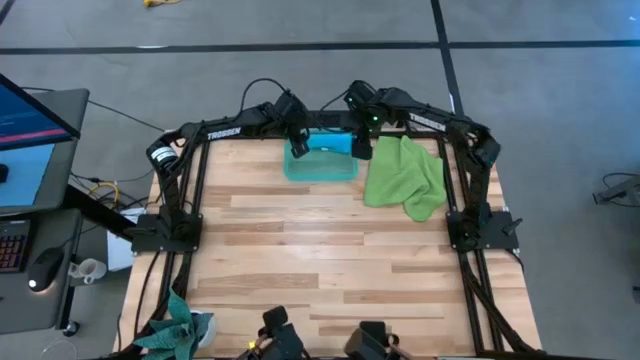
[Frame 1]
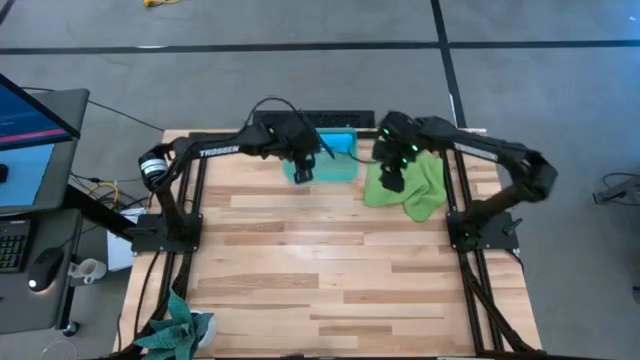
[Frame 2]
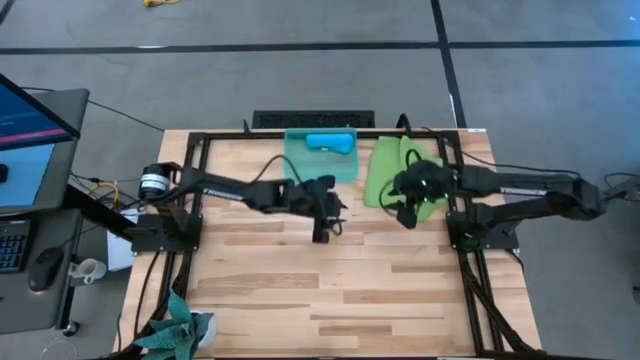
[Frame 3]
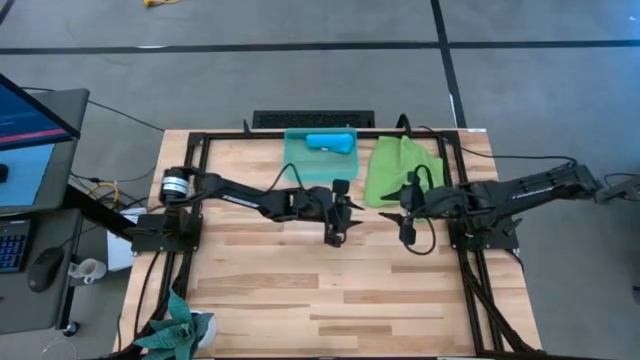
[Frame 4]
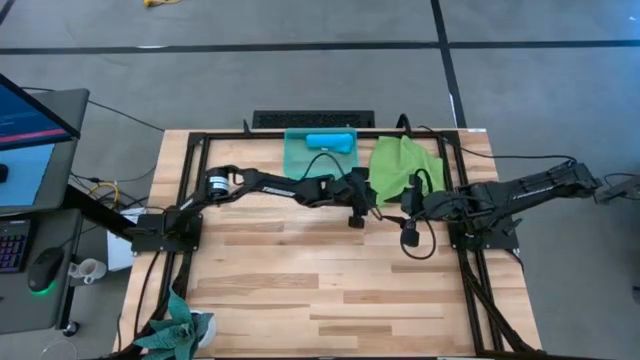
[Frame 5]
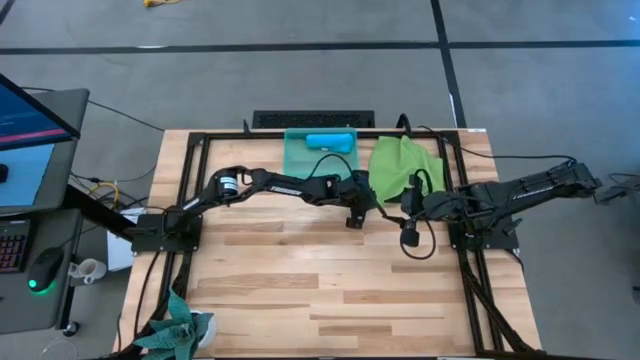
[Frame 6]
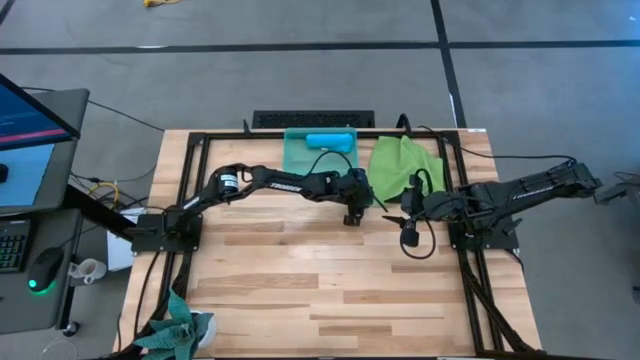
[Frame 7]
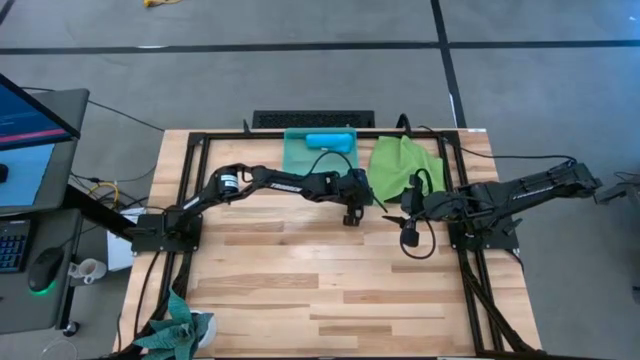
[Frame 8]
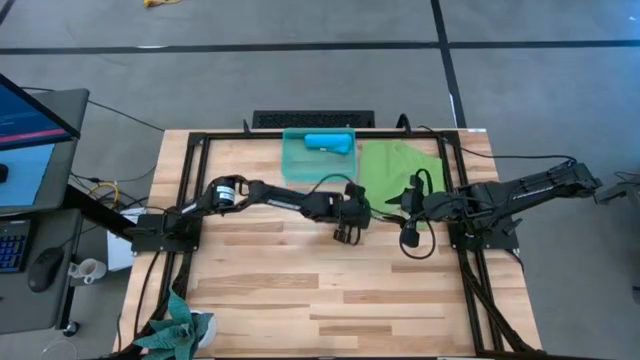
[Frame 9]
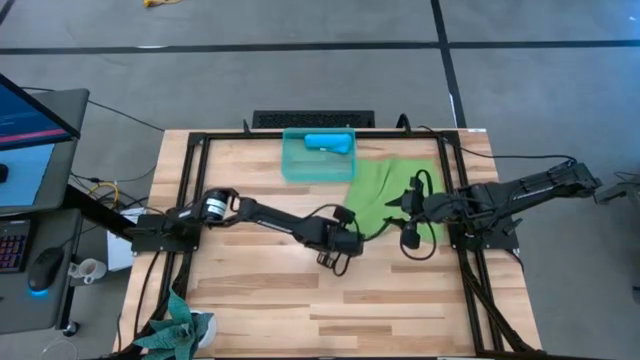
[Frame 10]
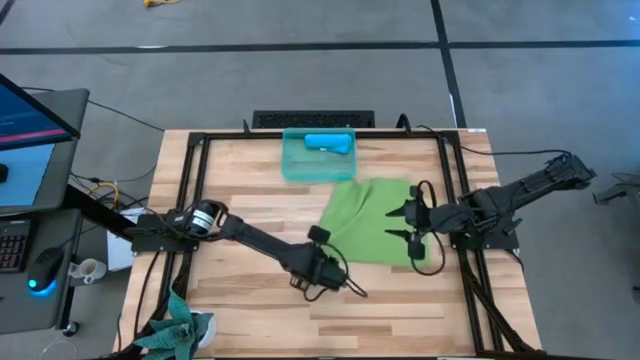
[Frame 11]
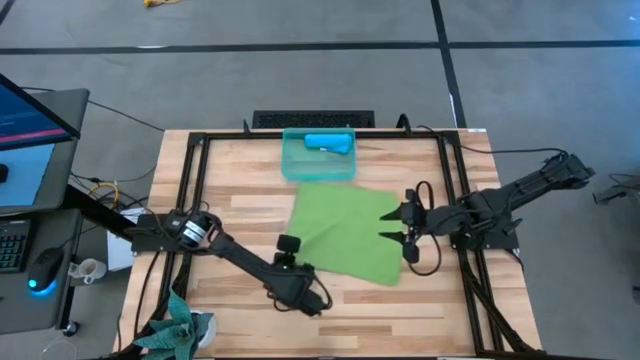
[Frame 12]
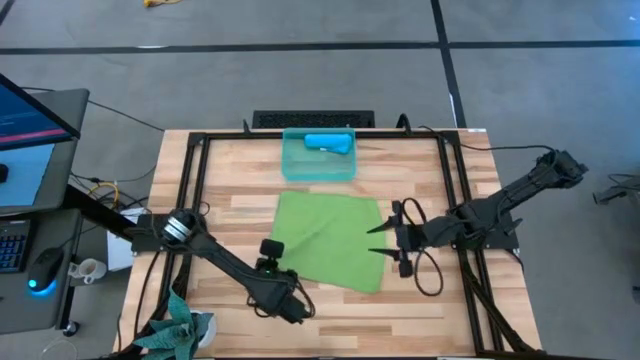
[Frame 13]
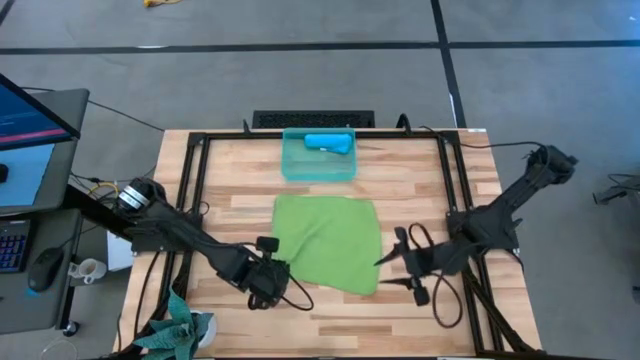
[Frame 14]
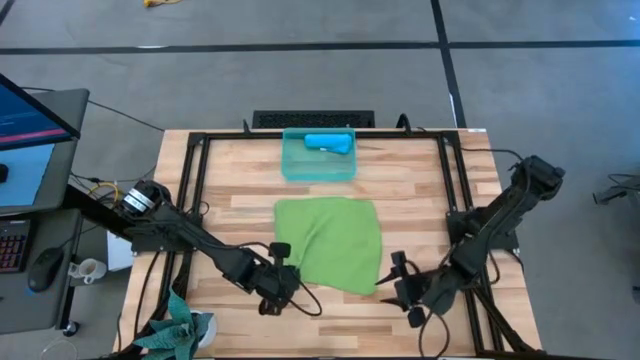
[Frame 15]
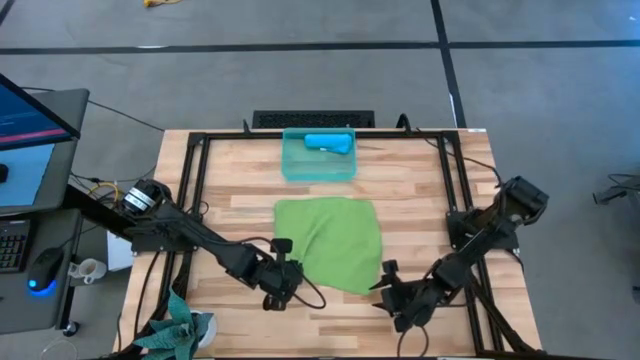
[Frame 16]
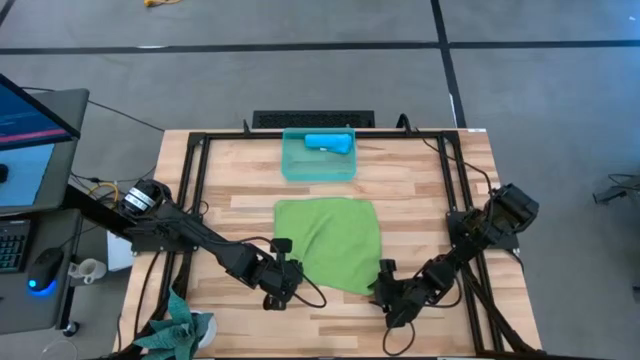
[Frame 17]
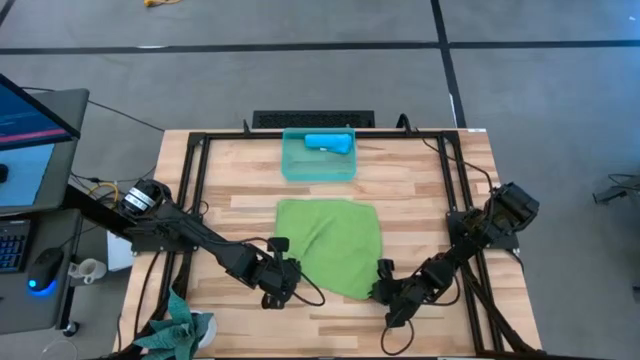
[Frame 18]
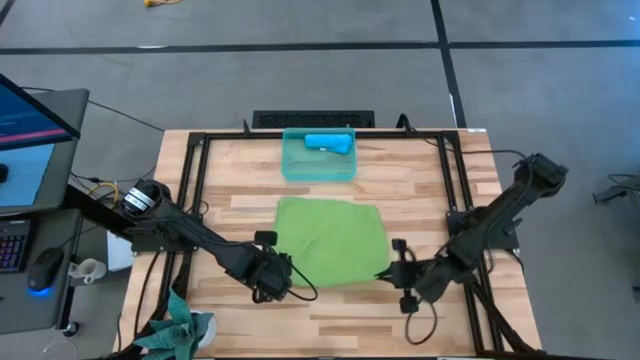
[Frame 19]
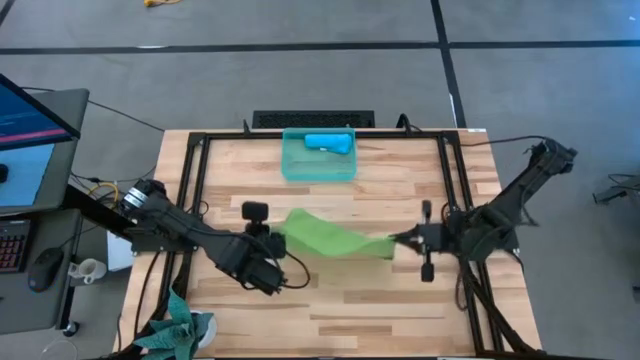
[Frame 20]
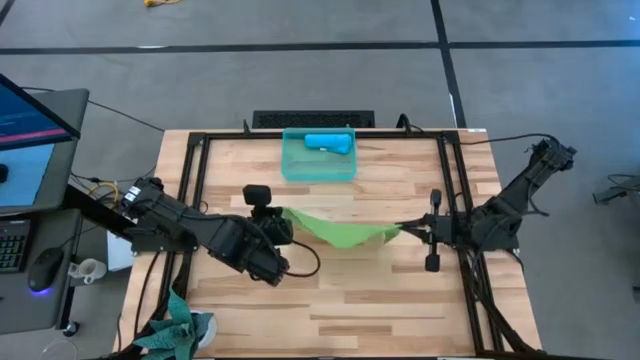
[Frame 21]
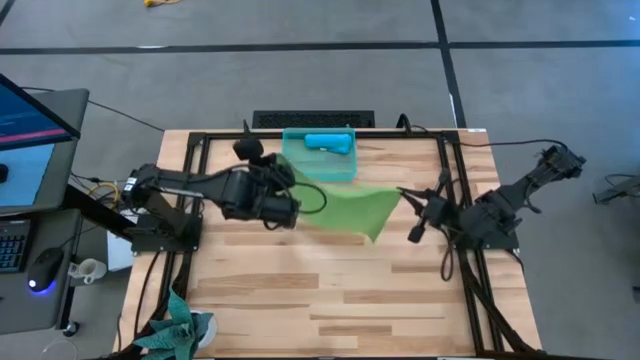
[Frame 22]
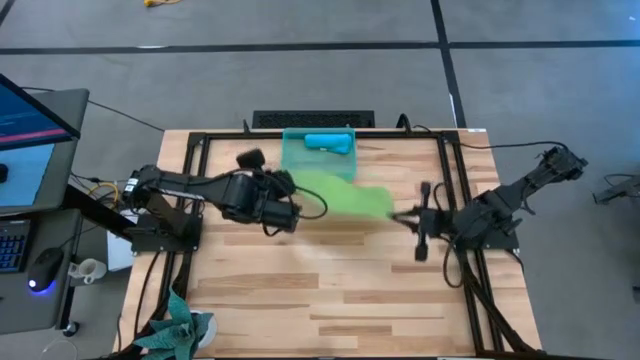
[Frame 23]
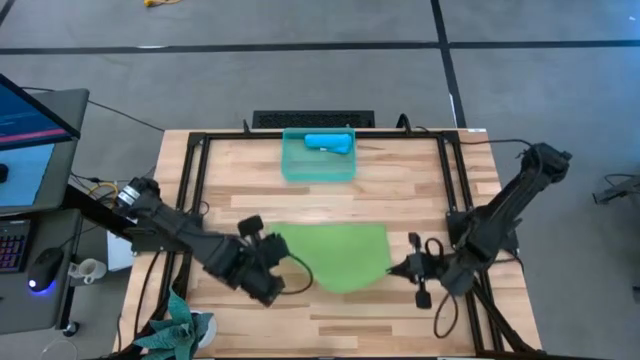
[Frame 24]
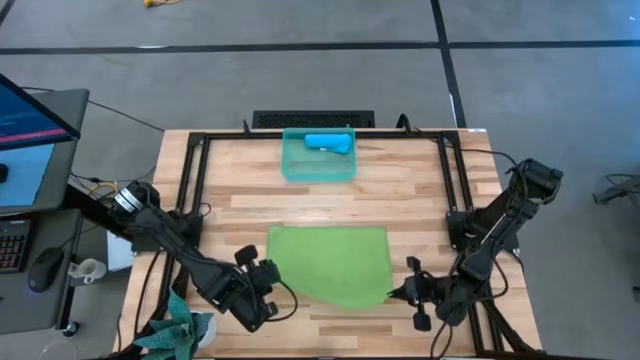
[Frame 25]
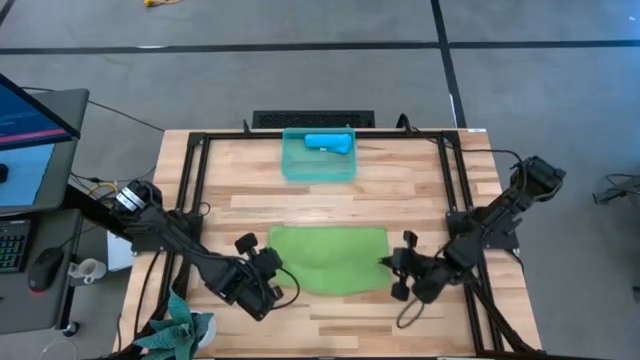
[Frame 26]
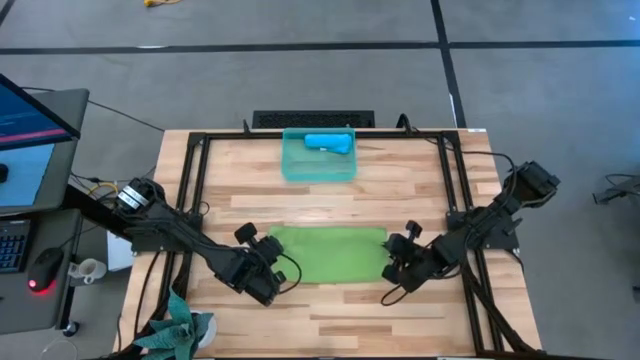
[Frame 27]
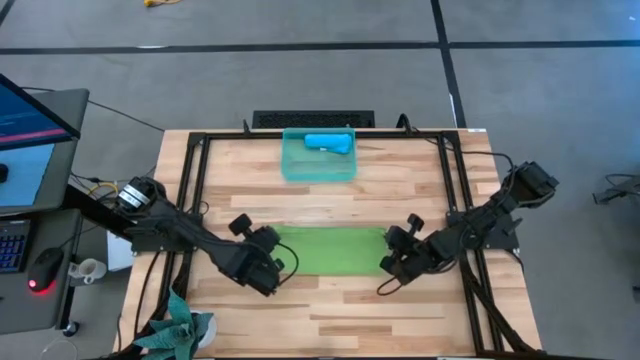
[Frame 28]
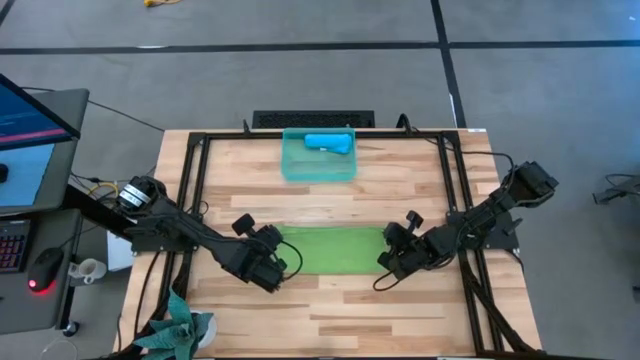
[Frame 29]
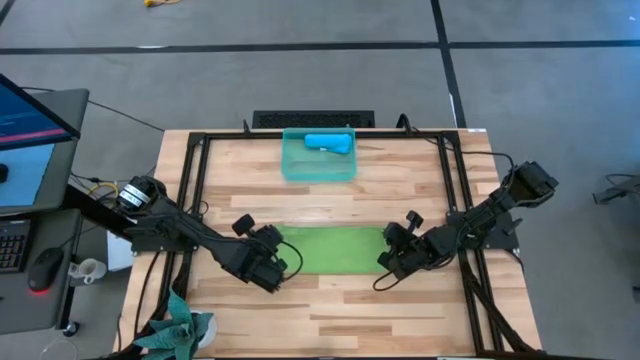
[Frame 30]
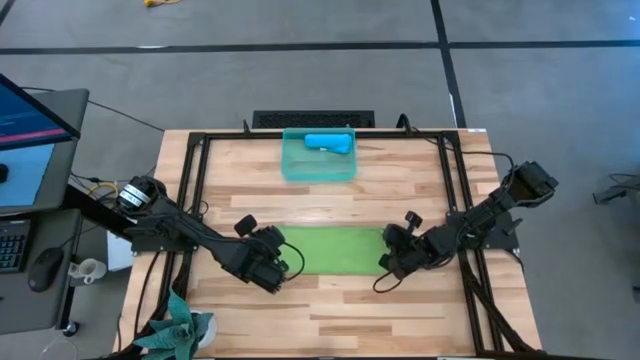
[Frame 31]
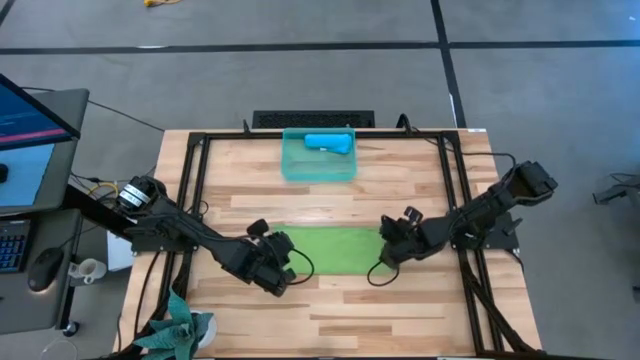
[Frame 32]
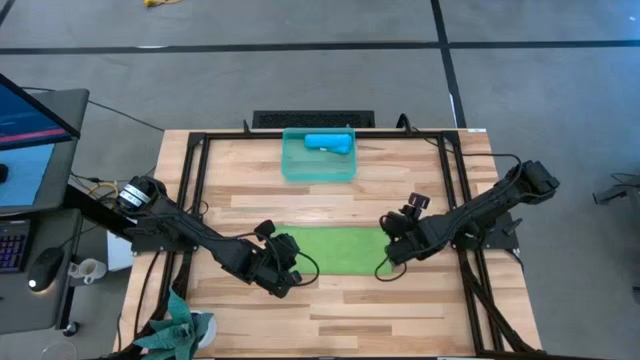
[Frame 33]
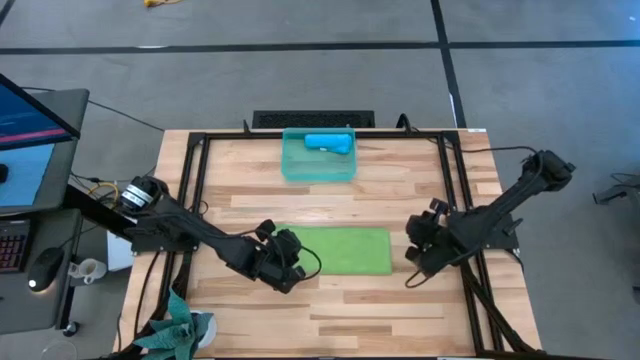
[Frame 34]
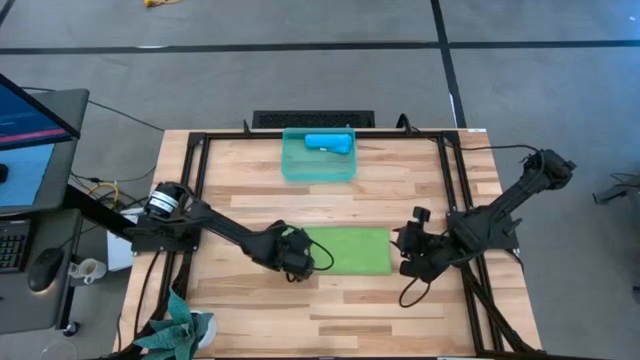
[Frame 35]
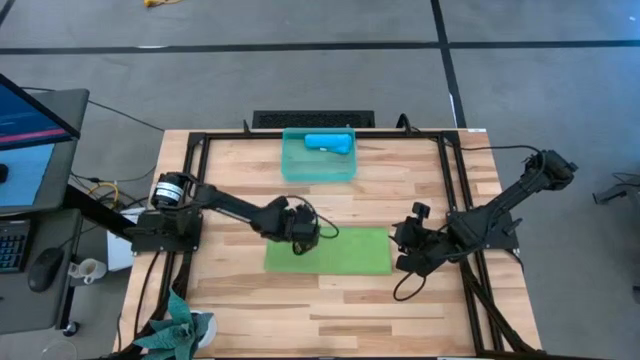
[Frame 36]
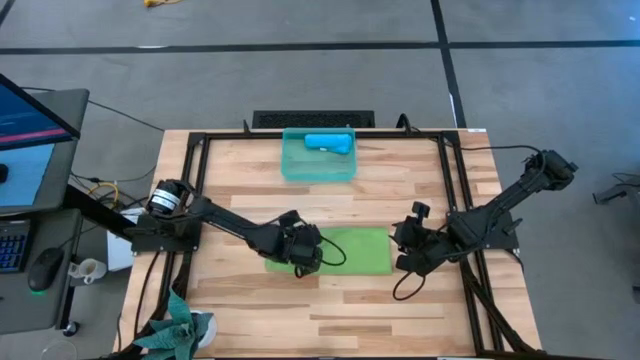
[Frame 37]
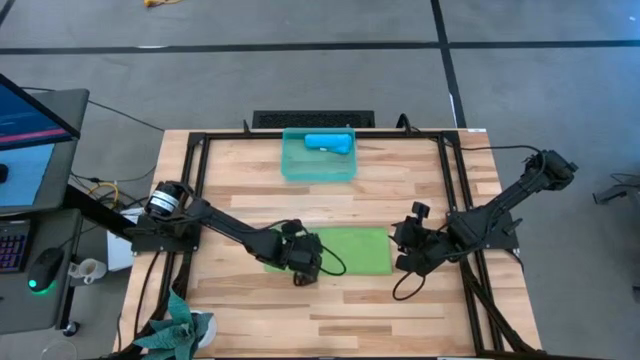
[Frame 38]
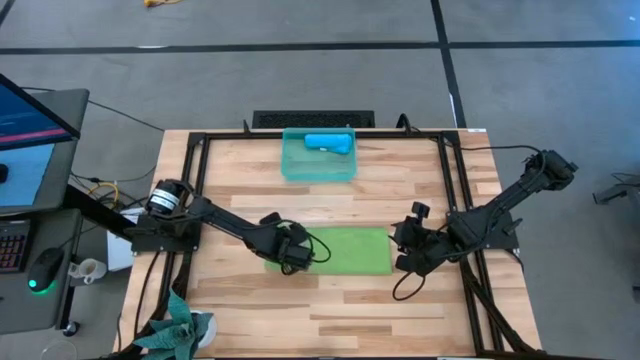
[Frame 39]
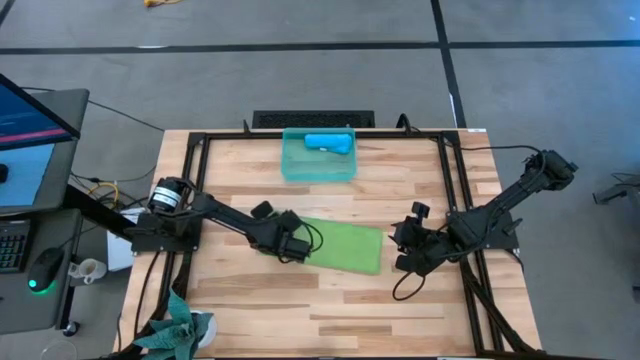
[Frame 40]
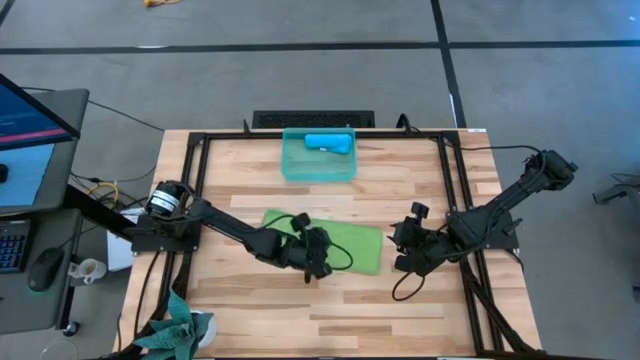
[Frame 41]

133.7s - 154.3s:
Task: Roll microfiber towels into tight, uniform cylinder then place into a basket
Fold the green microfiber cloth
